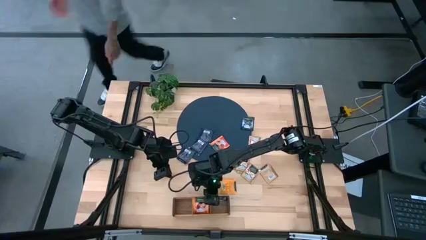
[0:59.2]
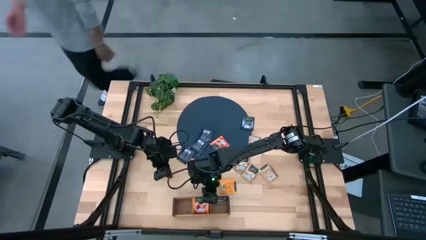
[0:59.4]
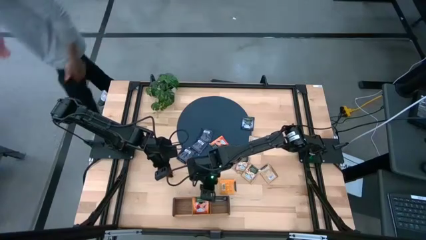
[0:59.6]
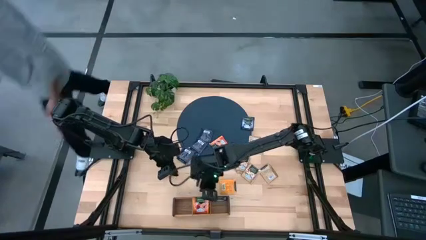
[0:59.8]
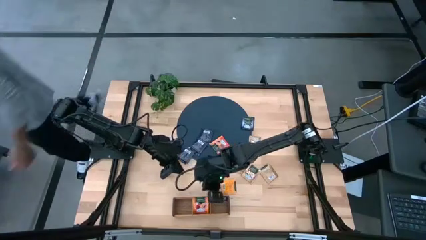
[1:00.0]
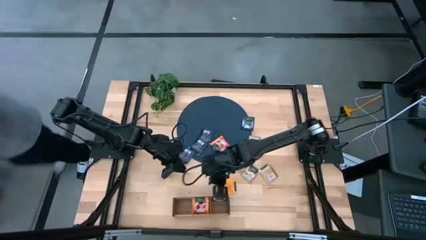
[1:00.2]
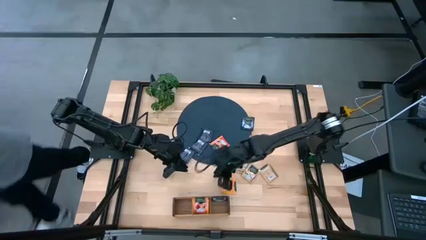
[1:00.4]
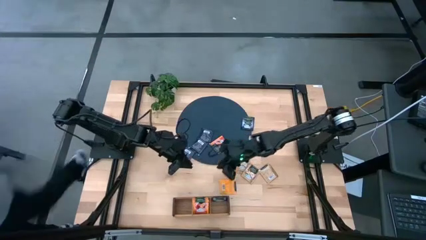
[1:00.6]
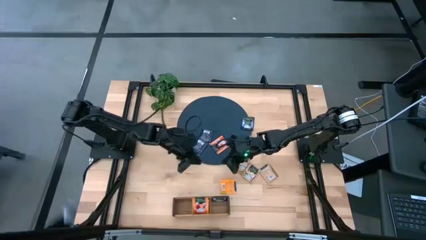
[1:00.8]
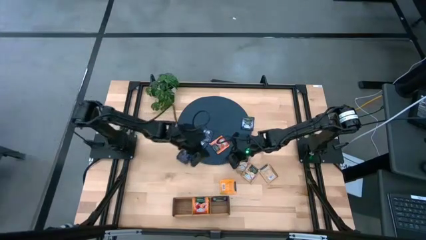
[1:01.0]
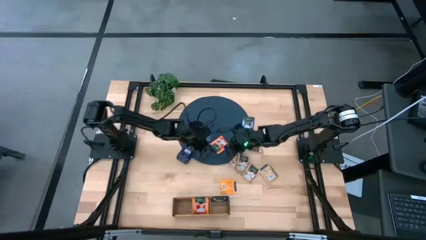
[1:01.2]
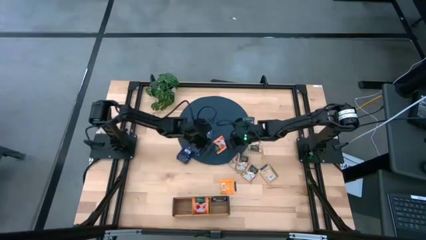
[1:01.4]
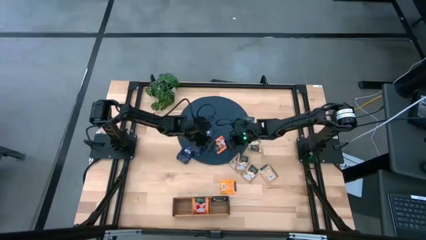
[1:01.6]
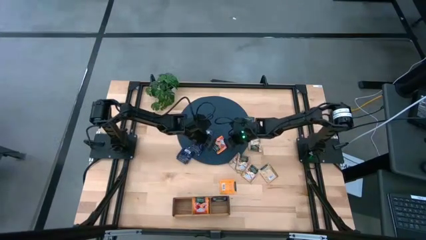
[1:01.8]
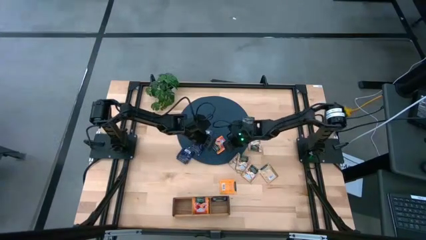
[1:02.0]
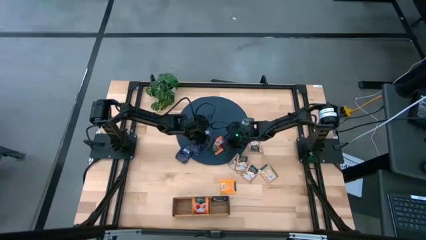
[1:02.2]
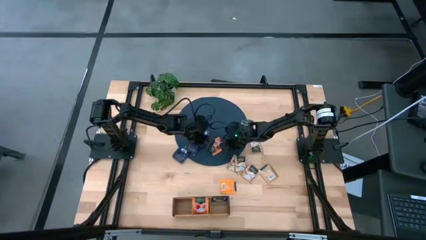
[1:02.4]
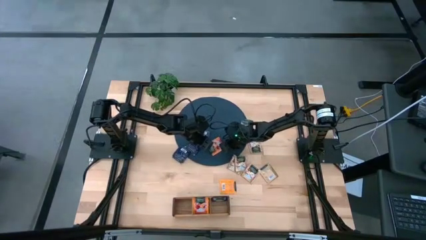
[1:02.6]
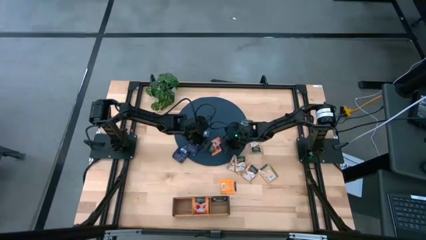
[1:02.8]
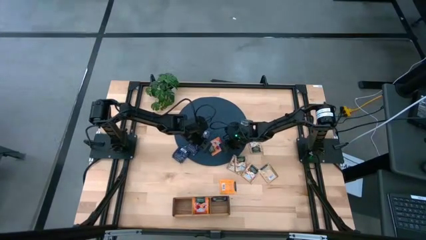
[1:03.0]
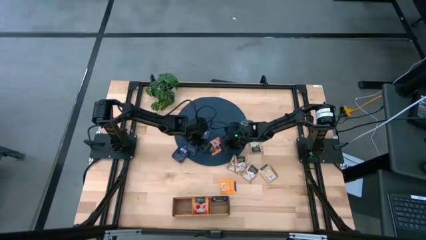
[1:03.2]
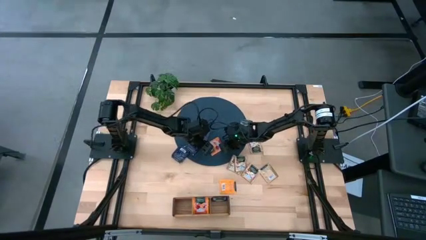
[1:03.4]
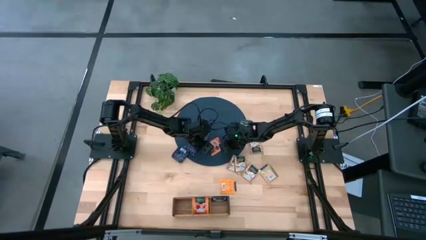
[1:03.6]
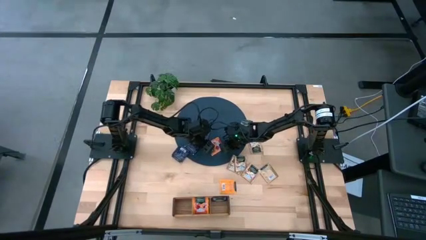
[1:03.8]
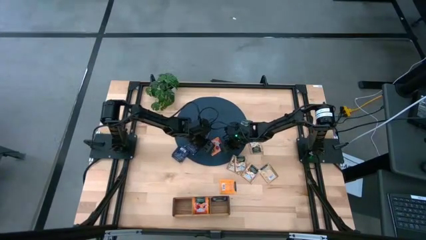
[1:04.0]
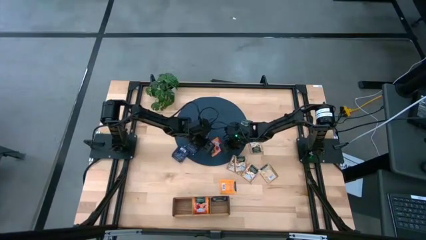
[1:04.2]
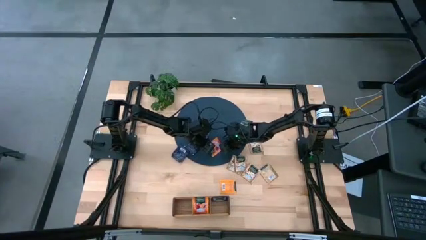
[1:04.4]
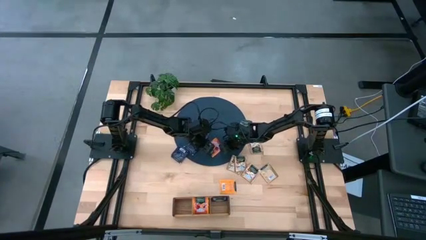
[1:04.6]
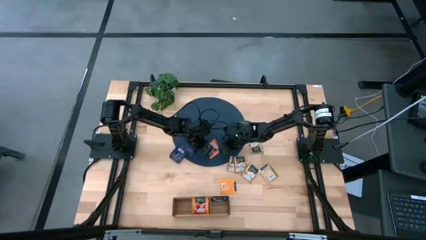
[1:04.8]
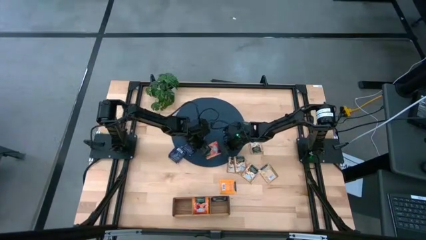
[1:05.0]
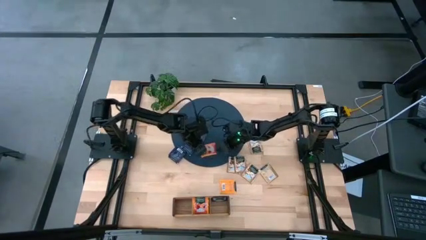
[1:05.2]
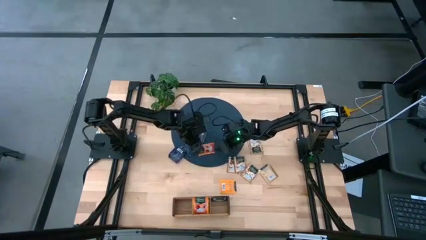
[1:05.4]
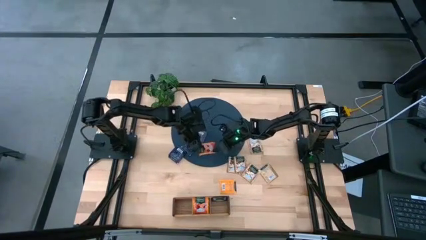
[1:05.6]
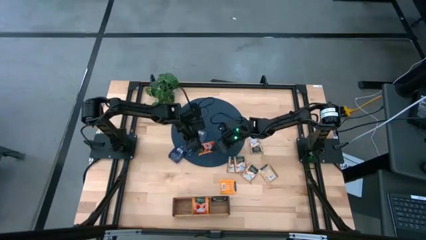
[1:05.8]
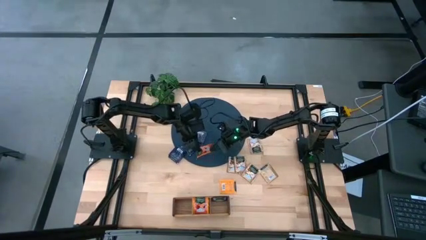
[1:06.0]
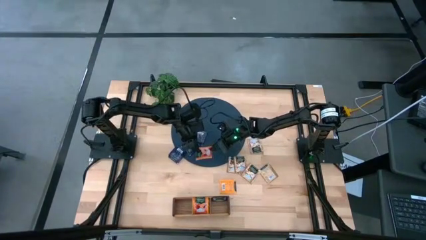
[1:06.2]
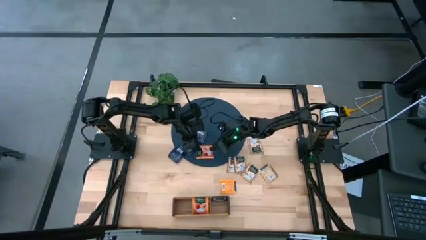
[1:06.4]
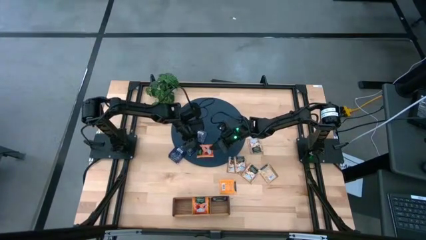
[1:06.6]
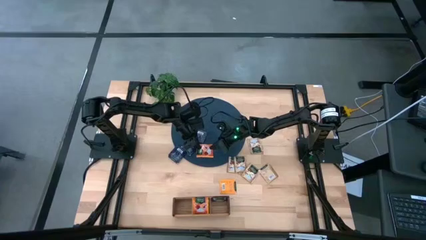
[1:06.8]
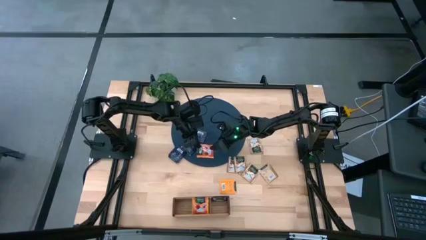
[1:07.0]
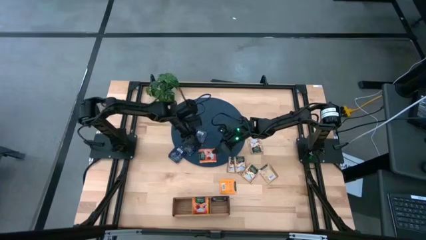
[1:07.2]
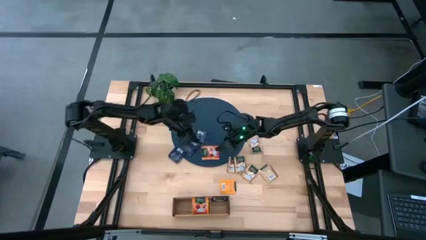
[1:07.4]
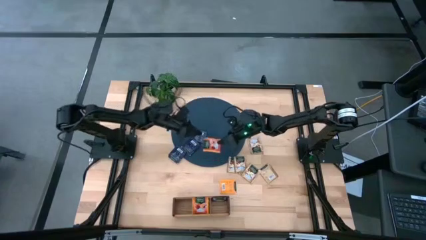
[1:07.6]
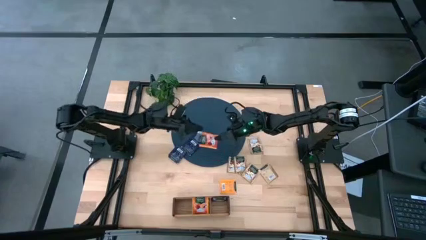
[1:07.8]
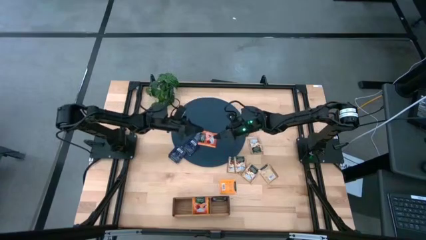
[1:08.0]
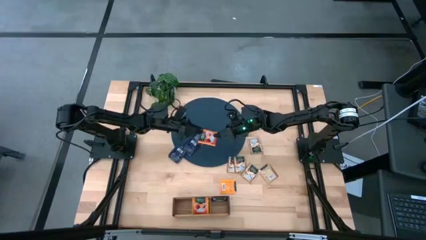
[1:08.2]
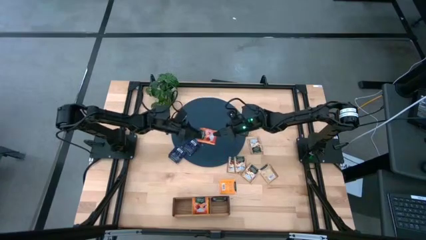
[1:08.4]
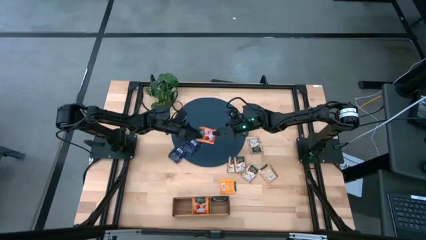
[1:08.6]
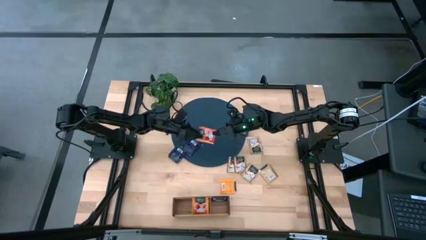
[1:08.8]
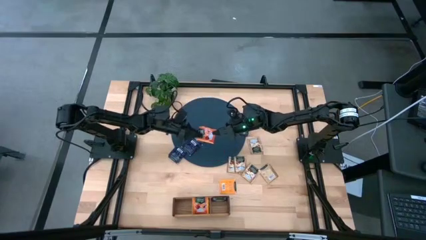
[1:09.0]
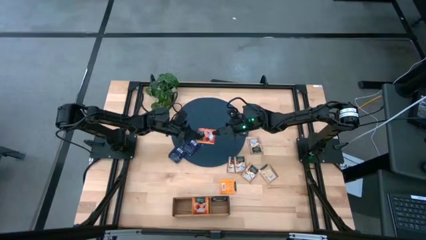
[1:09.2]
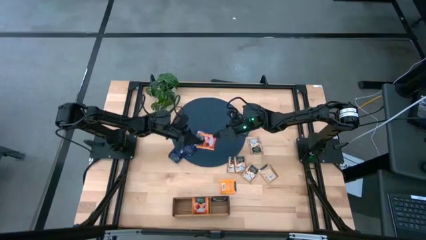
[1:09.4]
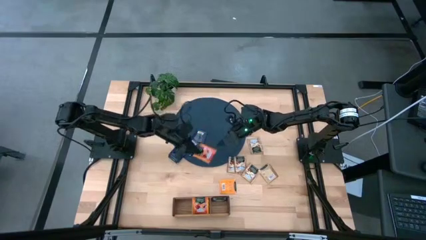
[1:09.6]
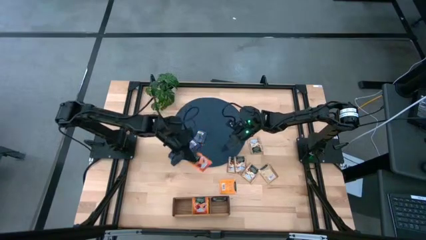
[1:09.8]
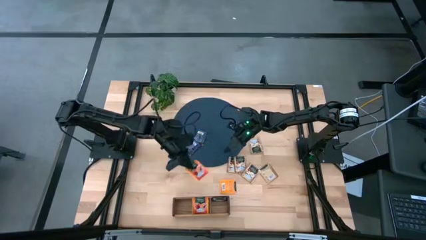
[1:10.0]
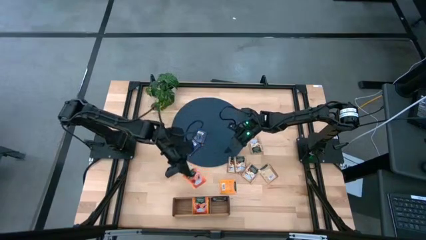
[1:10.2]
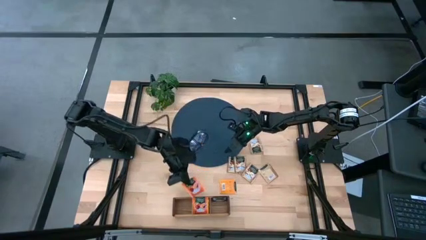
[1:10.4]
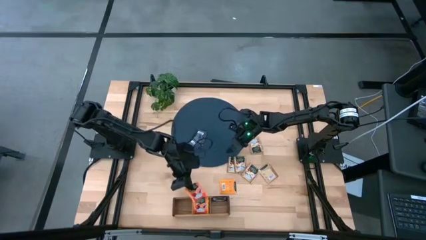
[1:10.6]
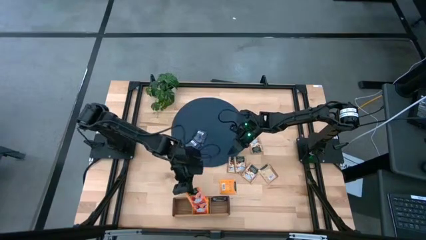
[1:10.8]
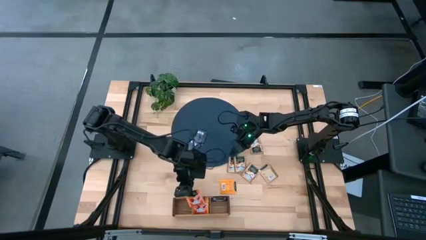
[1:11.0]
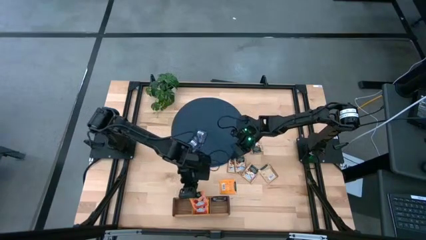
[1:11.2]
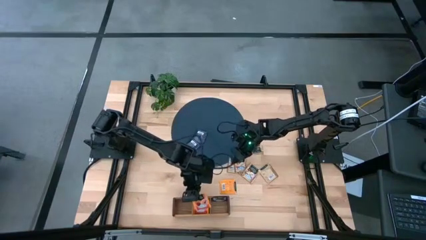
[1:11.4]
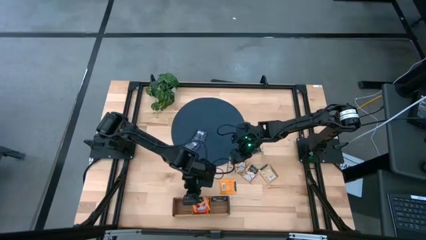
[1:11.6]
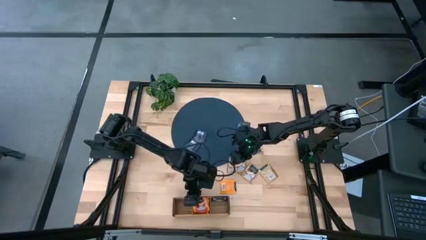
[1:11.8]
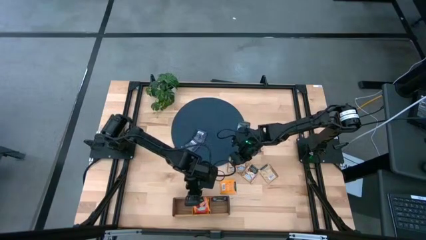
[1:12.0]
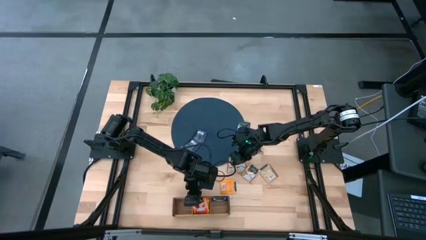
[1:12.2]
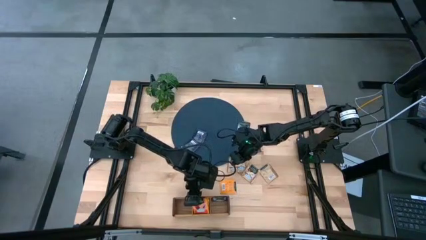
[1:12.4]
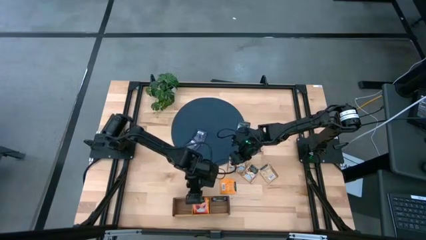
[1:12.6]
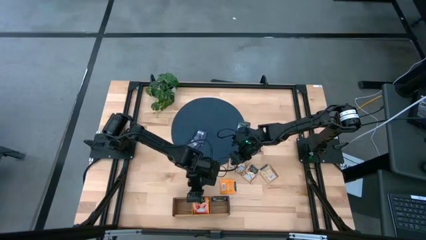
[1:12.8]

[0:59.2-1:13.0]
Task: Pick & Place Tea
Put the orange tea bag into the middle section of the wooden organizer

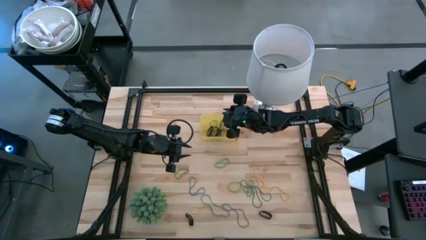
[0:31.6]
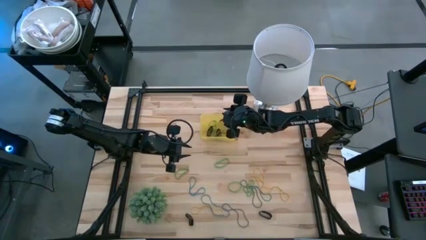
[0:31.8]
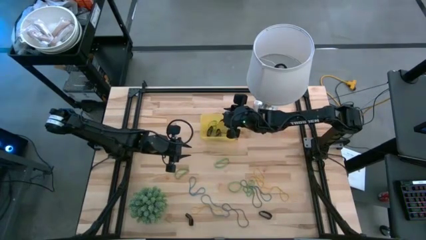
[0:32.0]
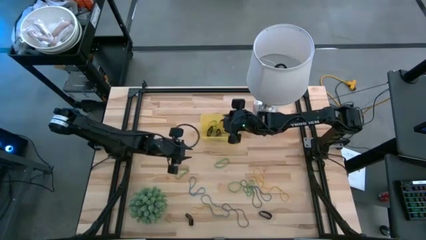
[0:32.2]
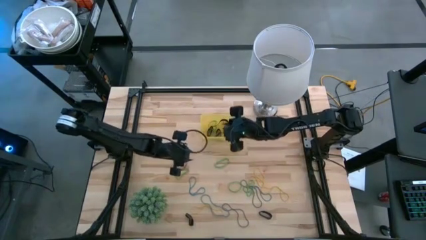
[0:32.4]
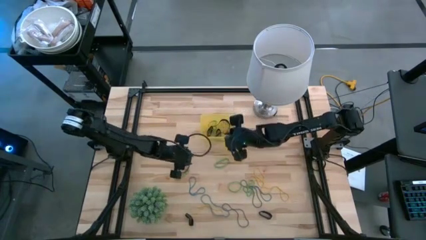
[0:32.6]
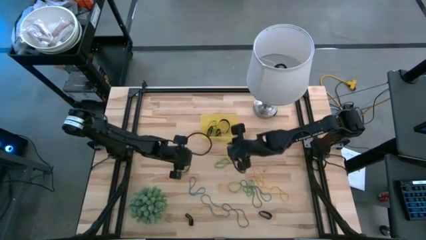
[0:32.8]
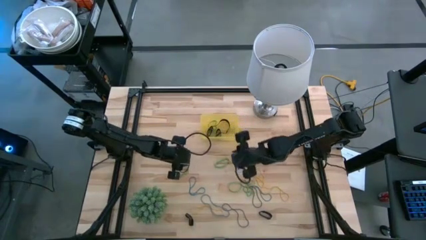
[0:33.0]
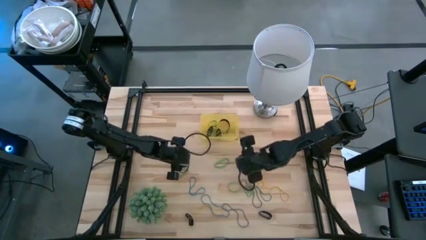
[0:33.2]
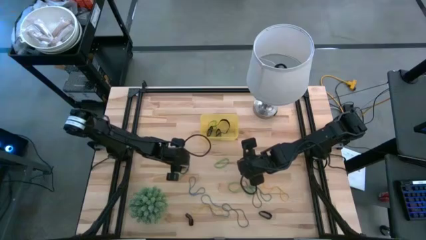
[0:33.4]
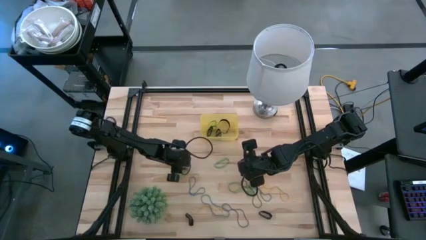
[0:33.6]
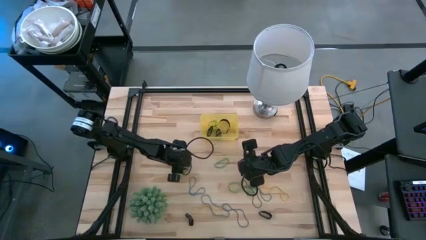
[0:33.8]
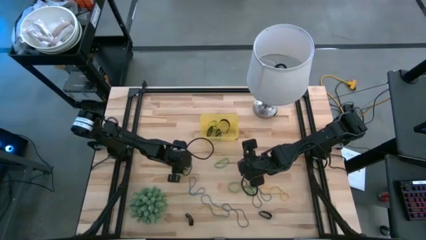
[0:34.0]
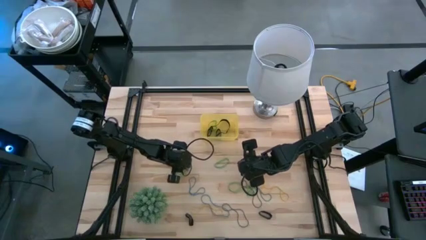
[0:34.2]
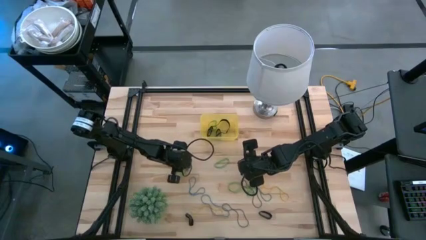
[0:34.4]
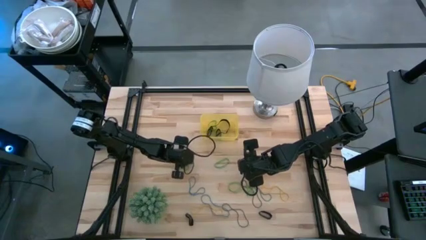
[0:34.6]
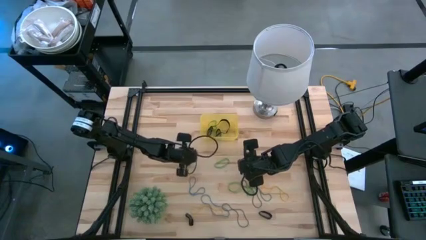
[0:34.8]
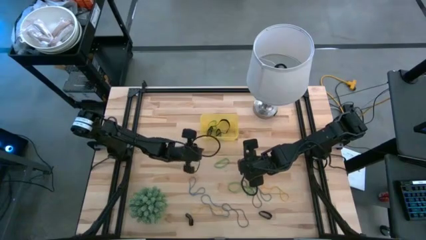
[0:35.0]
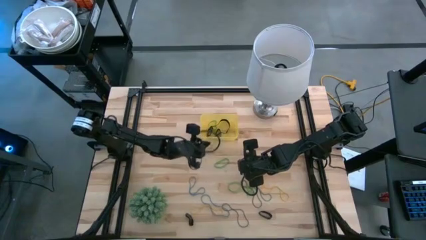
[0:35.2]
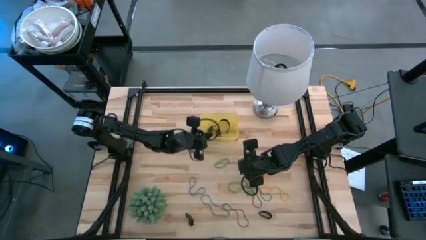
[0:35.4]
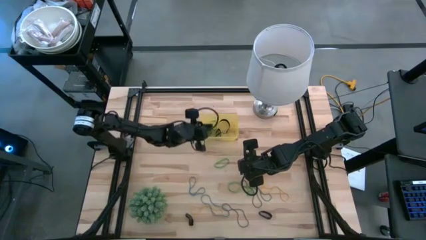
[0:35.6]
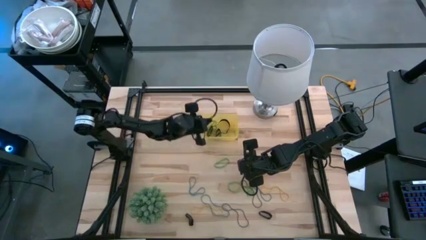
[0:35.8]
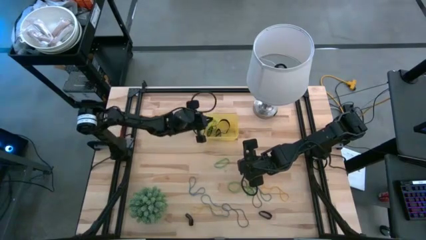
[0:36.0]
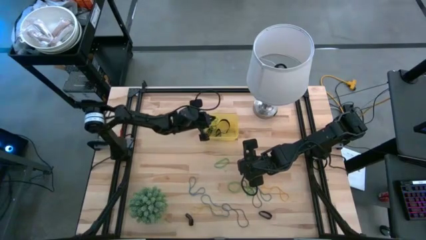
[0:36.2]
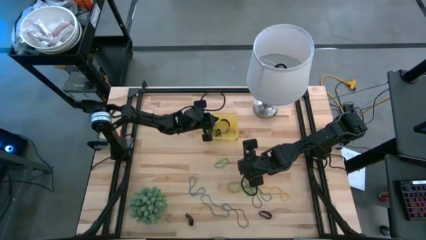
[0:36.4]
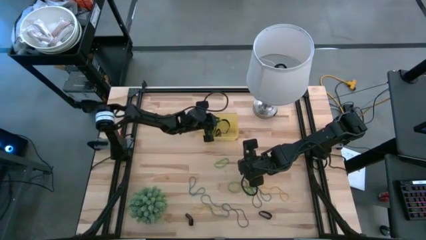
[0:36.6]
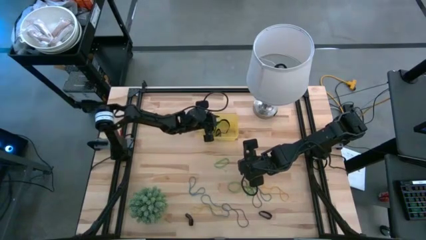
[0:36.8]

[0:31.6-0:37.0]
Task: Pick and place rubber bands into bin
Put the green rubber band into the yellow bin
